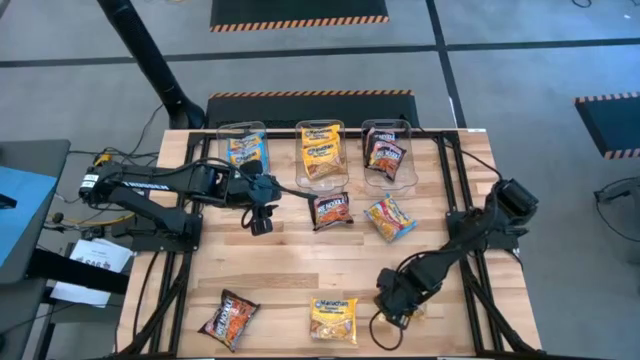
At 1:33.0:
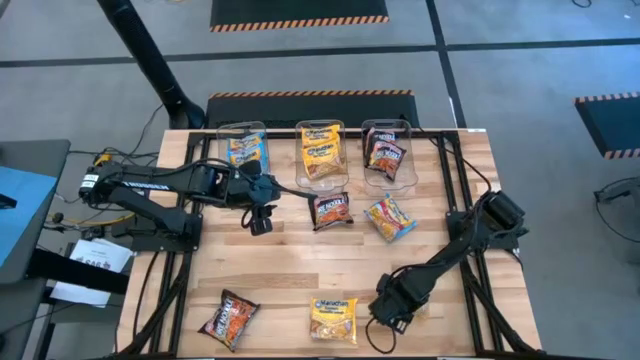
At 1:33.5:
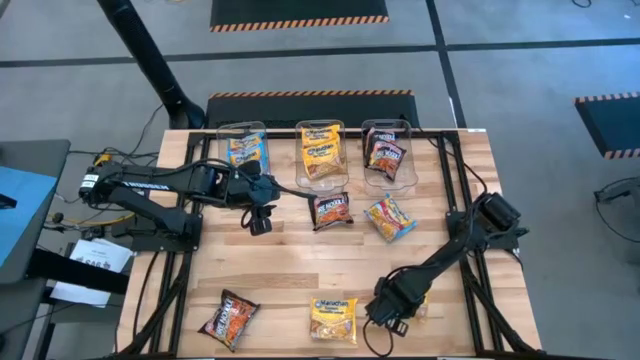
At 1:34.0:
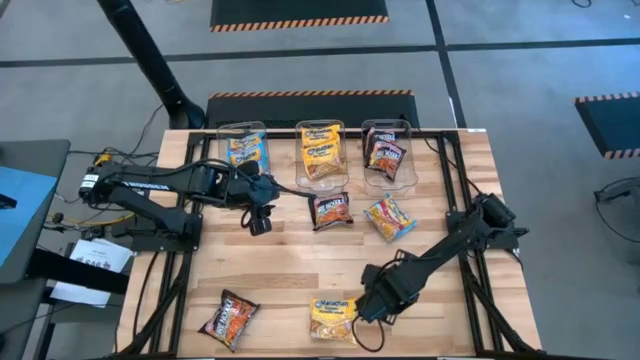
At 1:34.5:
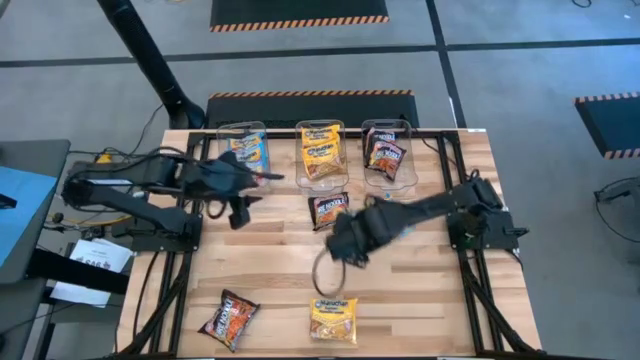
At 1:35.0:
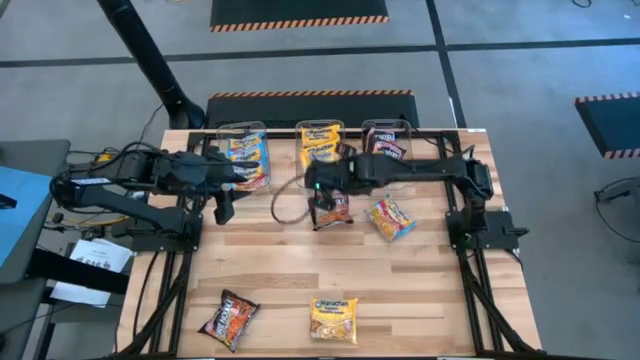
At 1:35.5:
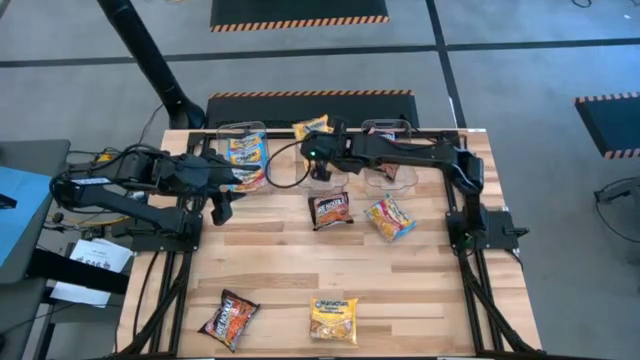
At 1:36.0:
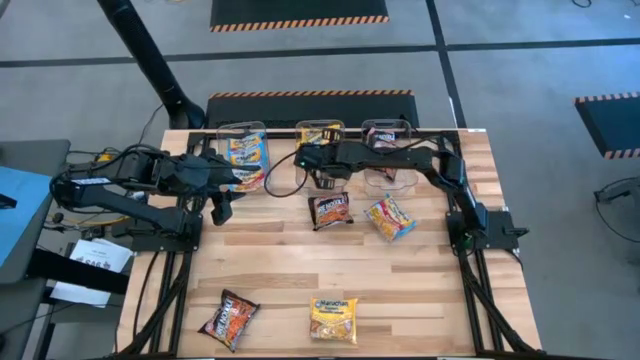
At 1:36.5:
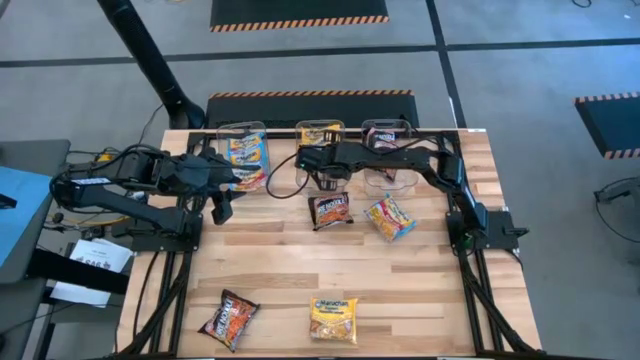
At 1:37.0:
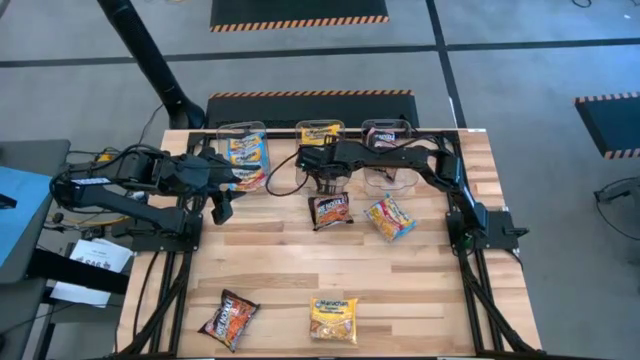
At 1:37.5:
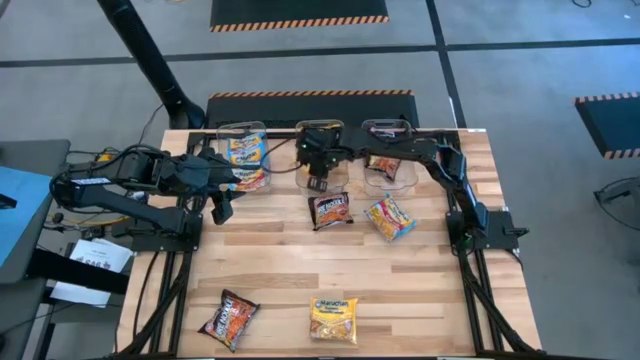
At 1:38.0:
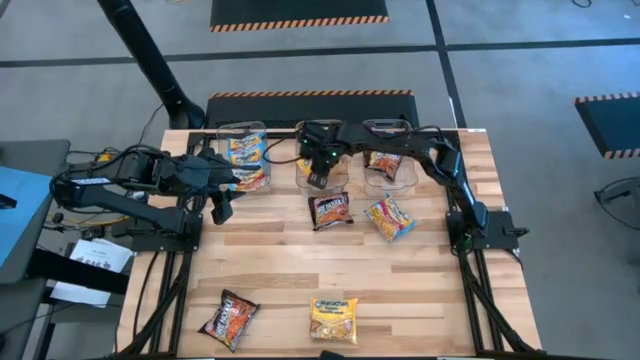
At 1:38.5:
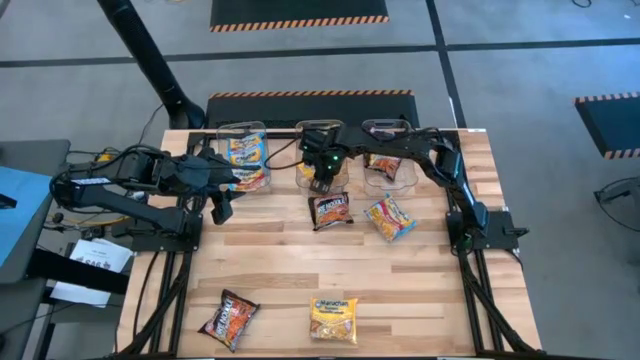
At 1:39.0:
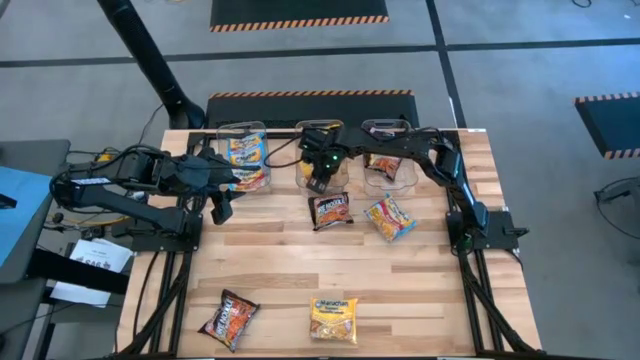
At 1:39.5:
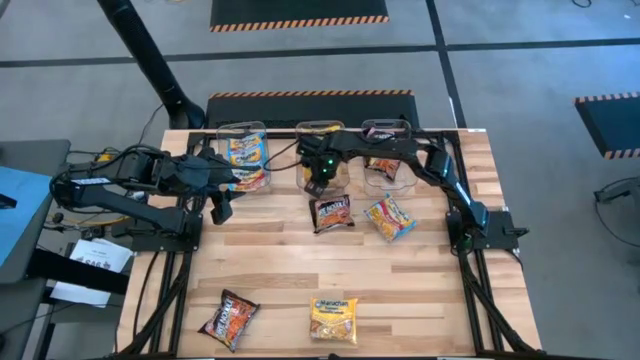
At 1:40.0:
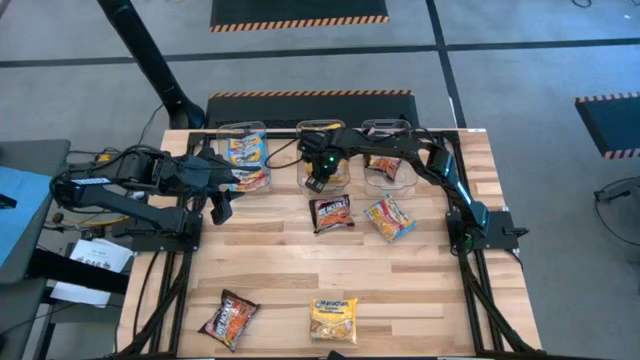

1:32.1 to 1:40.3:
Task: Sort Maruchan noodles
Put the yellow noodle pack into the middle transparent bin

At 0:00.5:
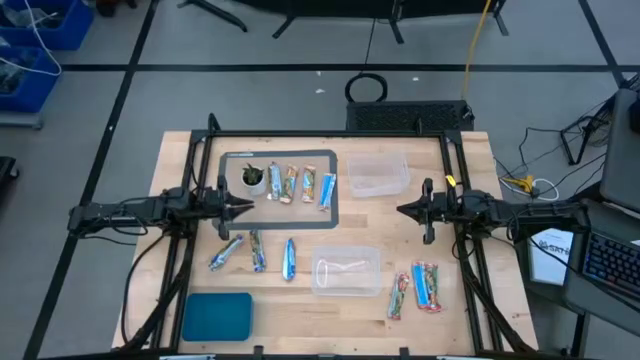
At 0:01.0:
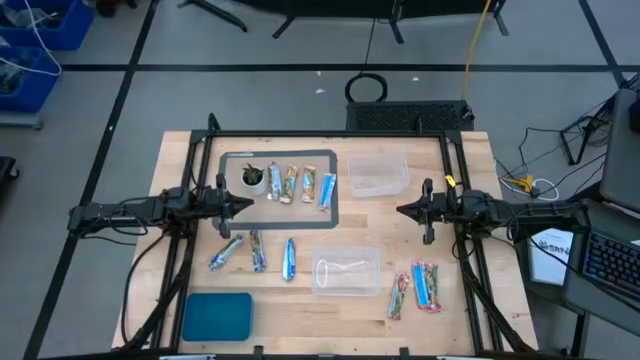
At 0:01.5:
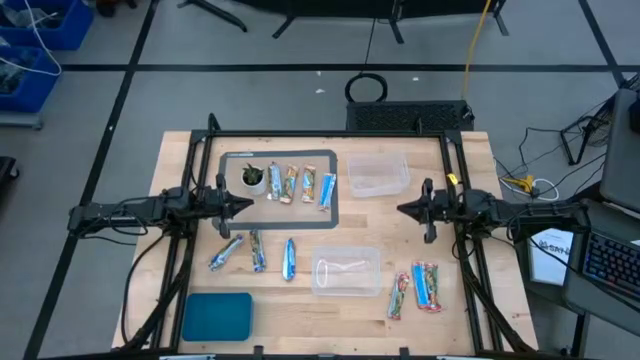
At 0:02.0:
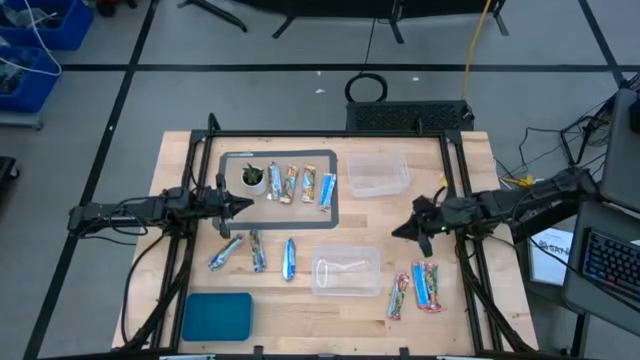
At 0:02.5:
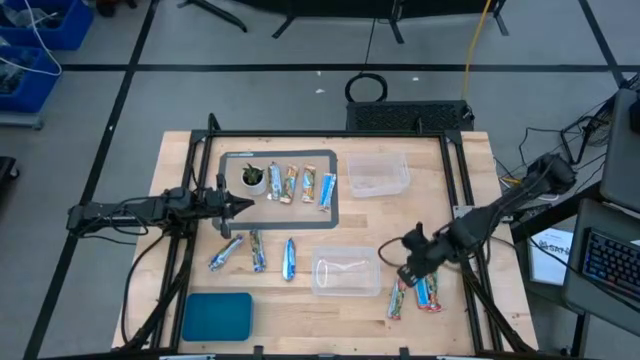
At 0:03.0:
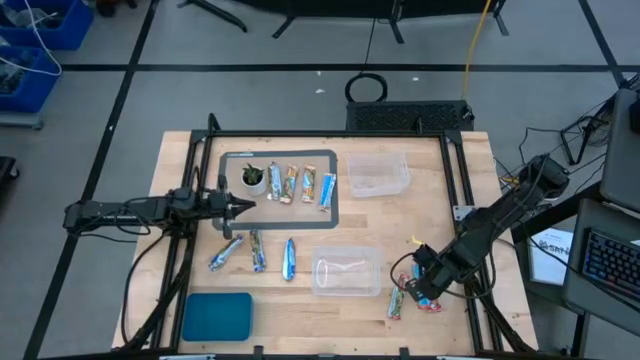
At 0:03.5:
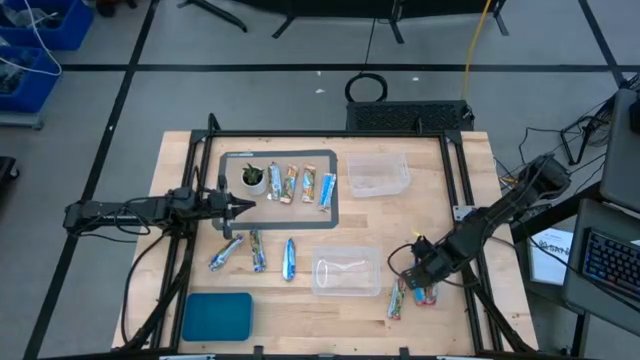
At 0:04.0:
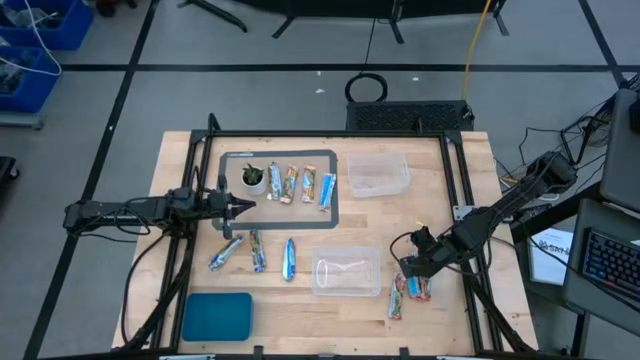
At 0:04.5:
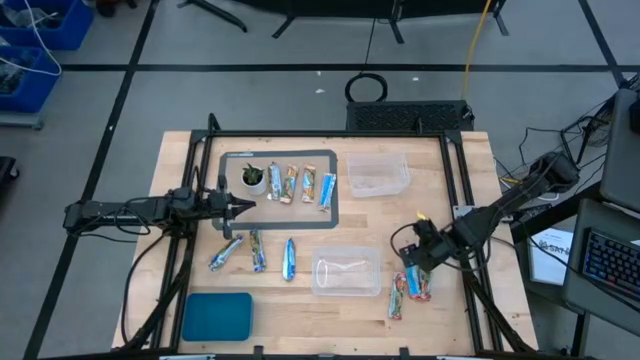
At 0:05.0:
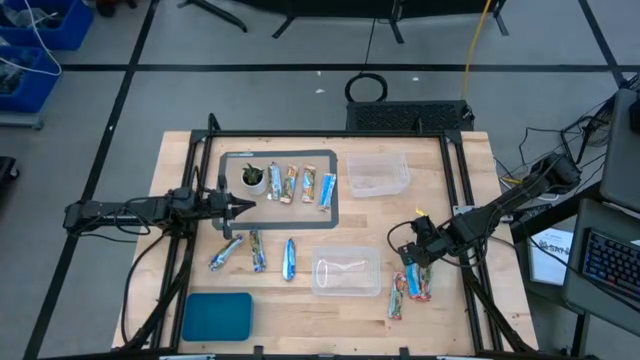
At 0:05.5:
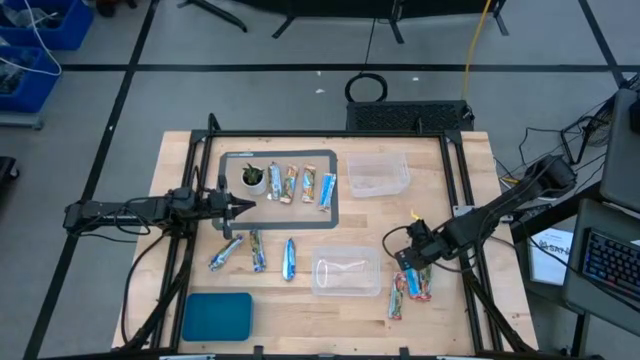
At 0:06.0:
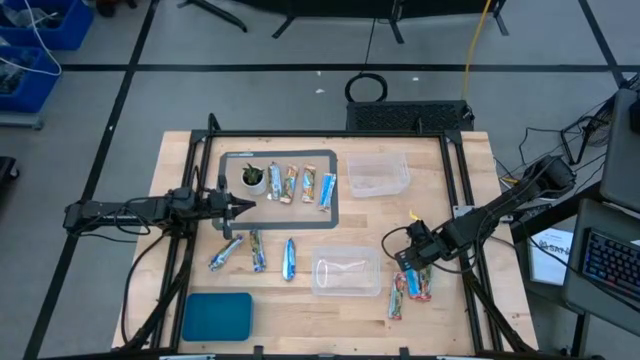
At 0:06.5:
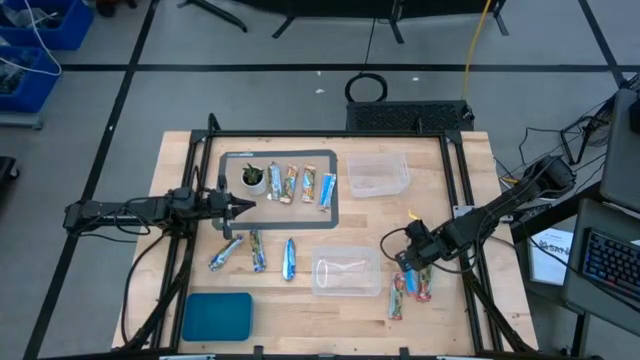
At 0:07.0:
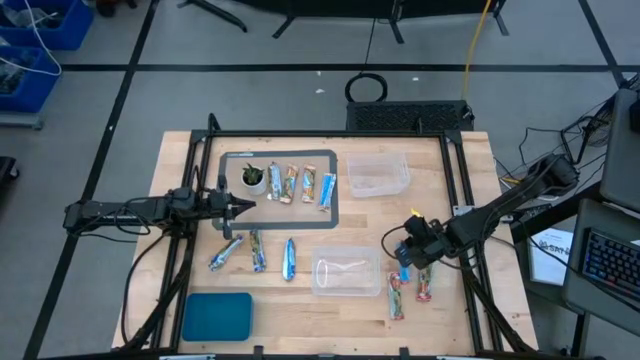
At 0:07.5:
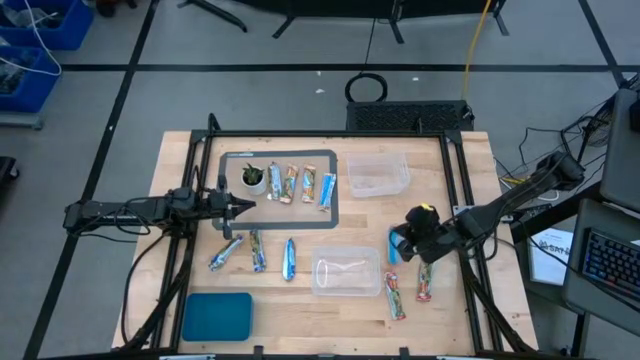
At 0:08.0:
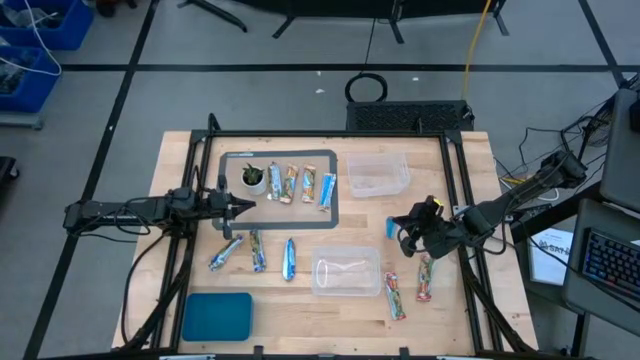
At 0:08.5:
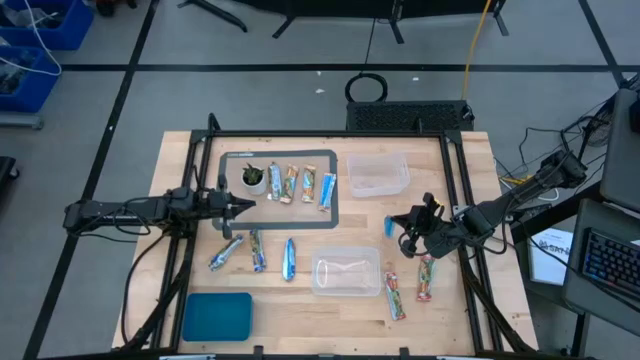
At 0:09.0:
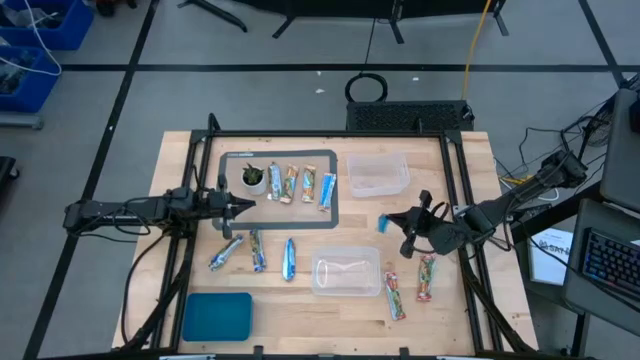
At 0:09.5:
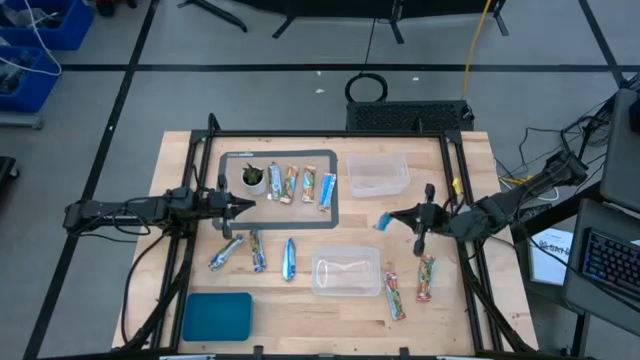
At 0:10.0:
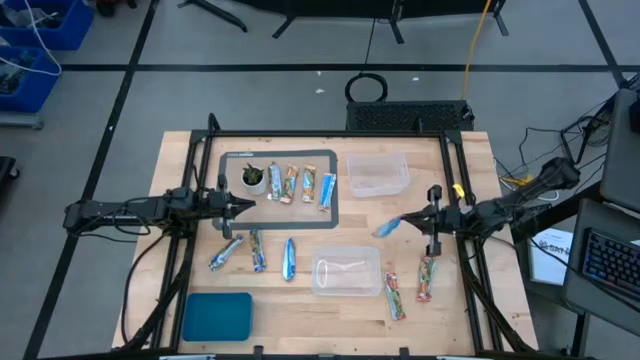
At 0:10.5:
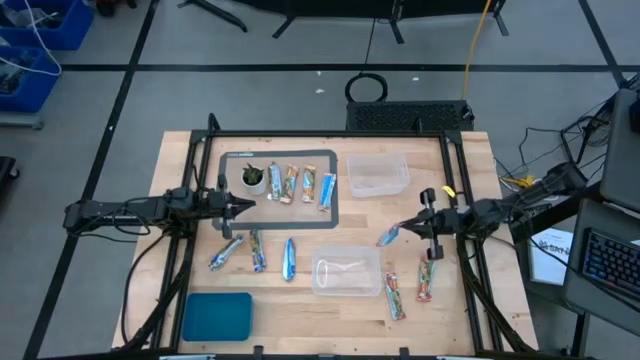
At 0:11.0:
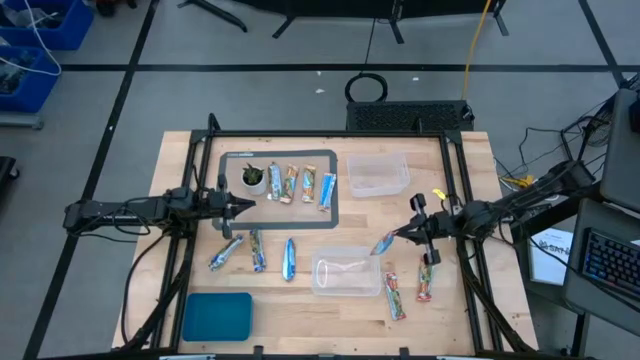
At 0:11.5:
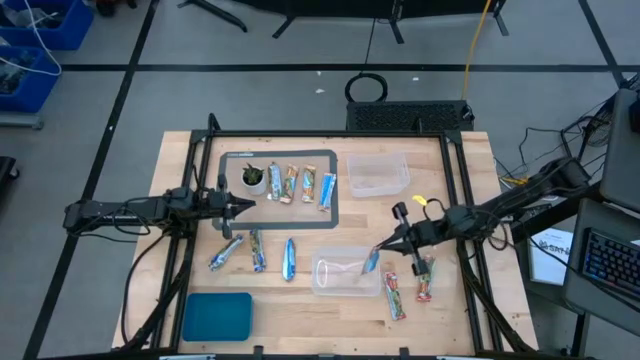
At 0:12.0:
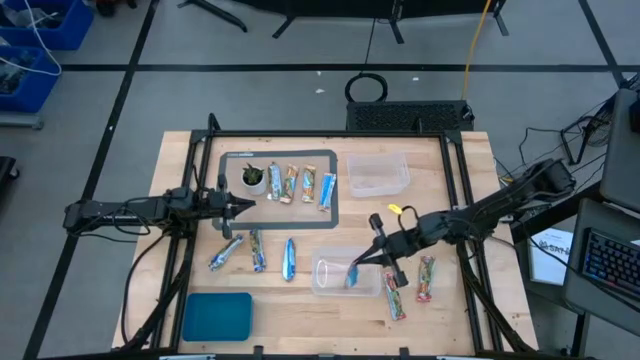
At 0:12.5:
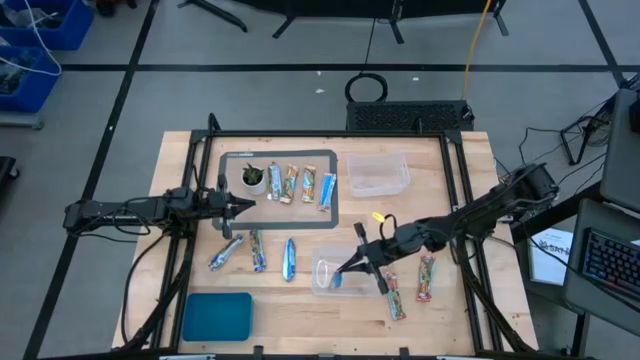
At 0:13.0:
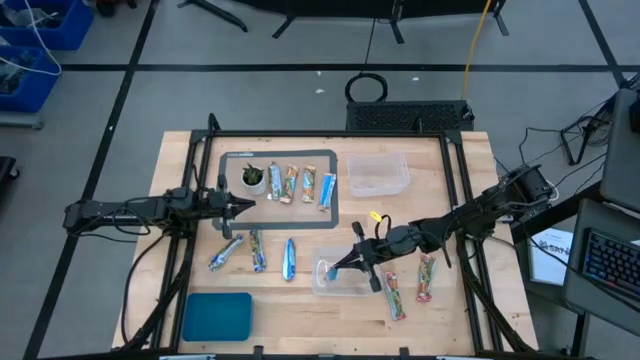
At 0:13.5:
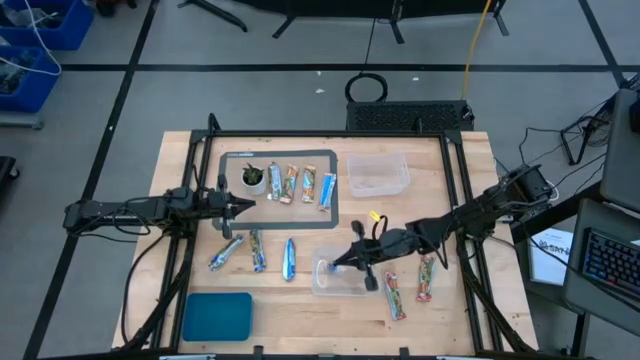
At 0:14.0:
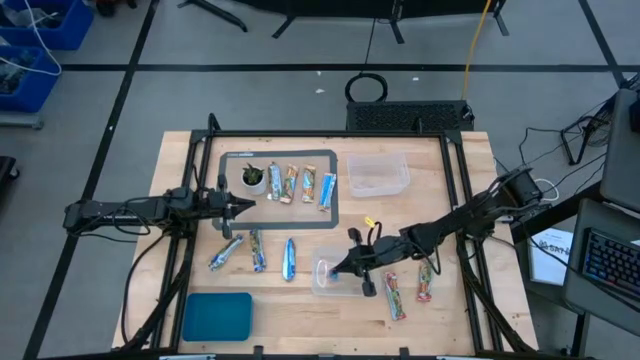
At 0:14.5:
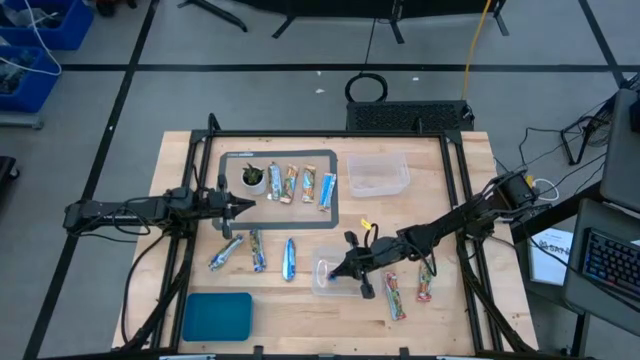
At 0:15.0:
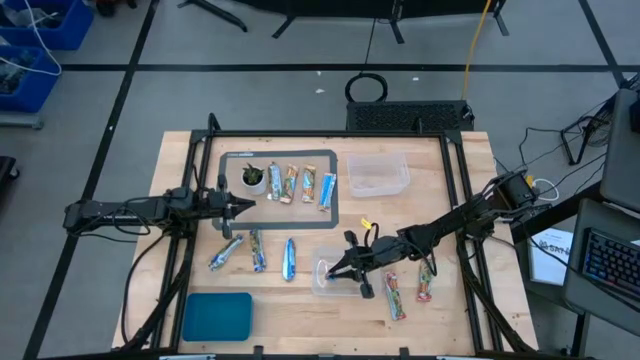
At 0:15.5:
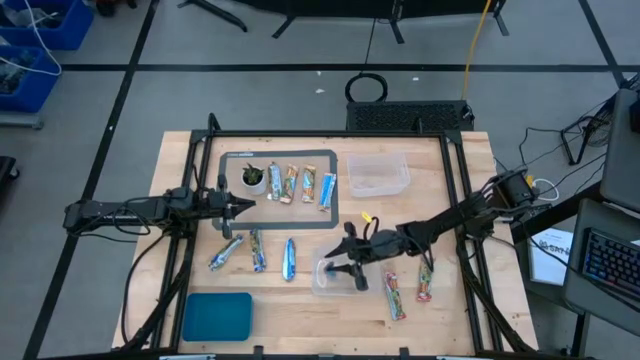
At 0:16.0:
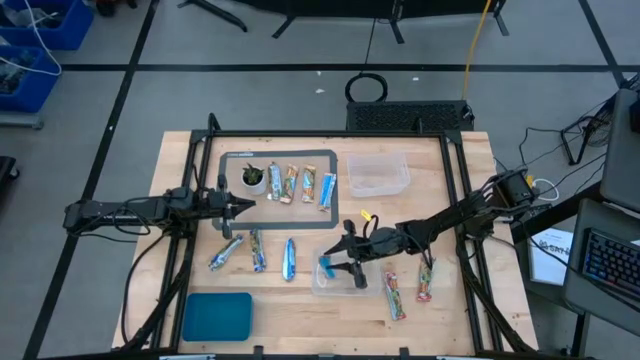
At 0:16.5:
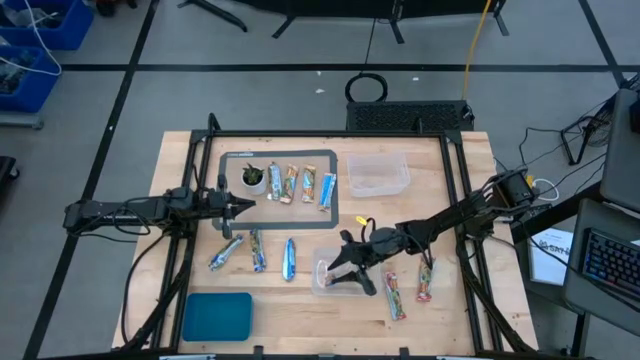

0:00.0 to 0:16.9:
Task: Pick and place Granola Bars by type
Put the middle red granola bar into the bottom transparent bin
